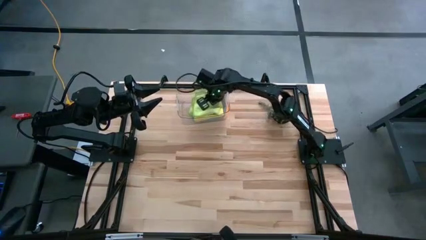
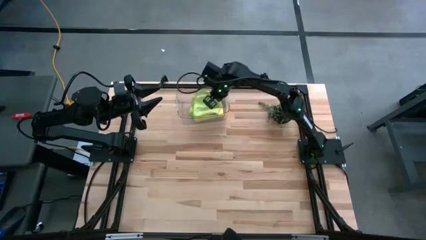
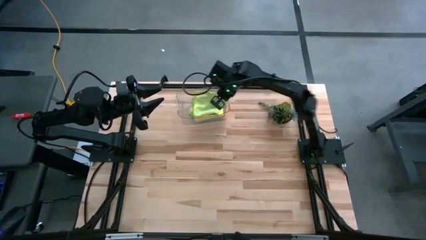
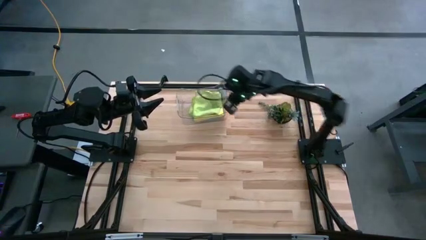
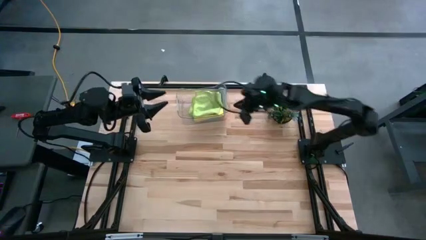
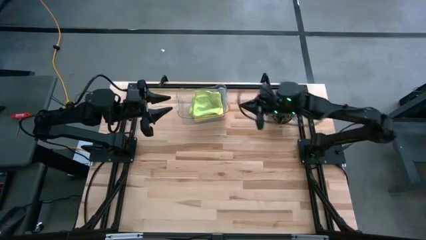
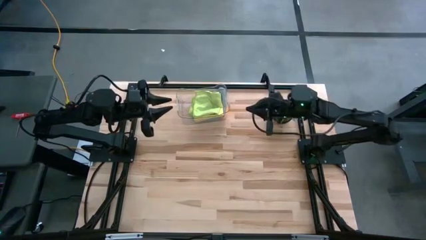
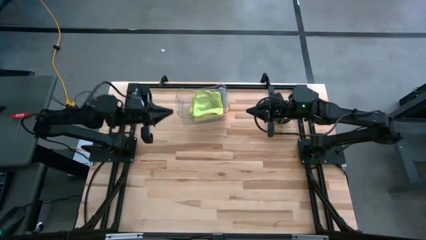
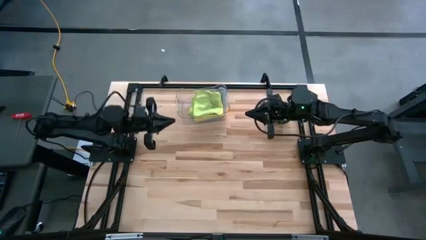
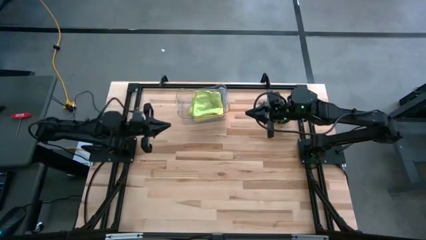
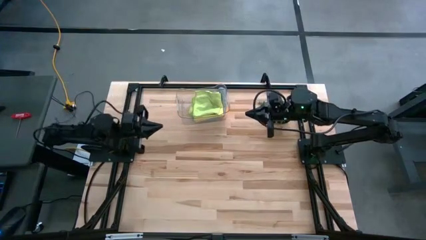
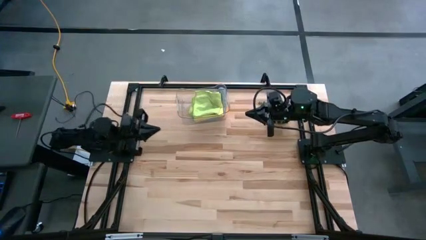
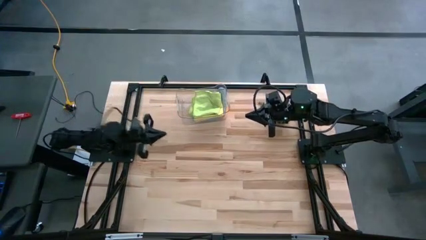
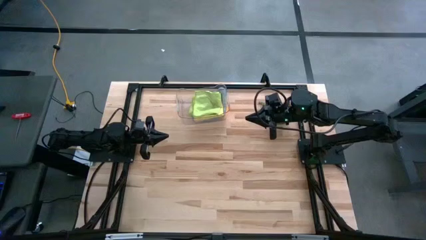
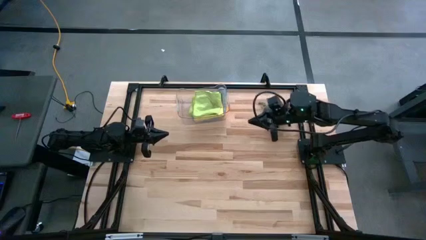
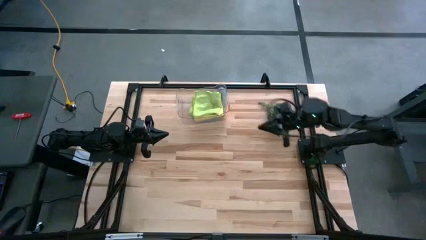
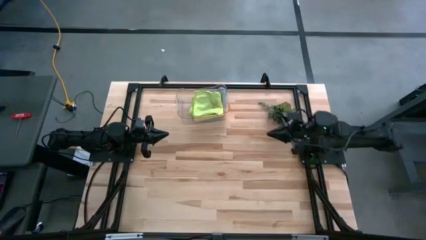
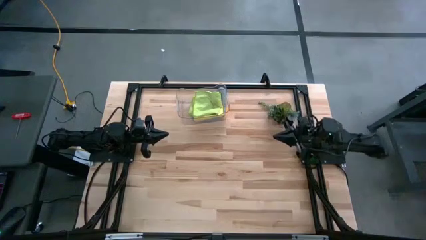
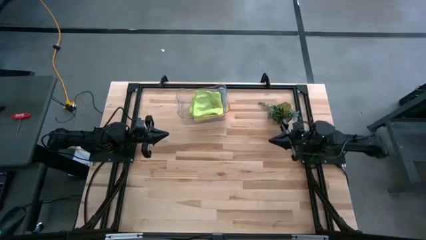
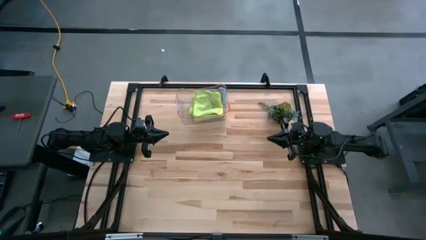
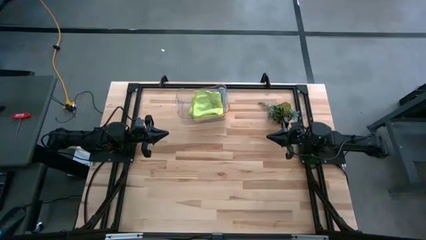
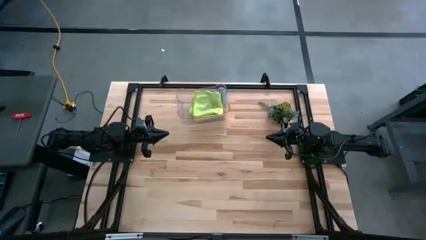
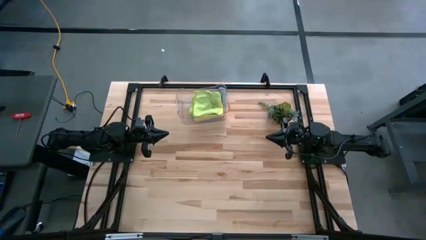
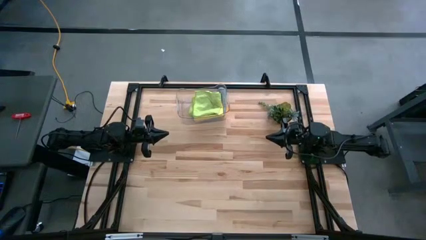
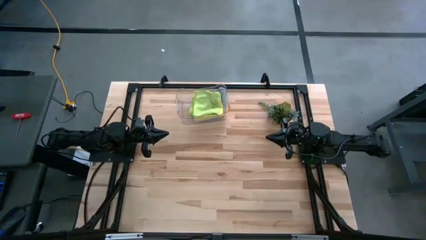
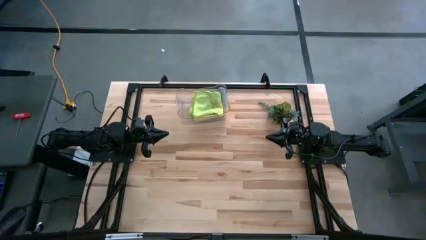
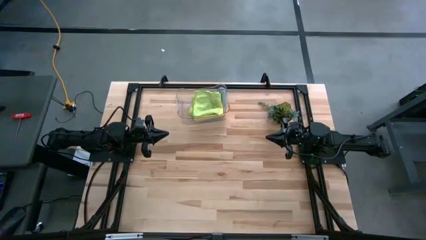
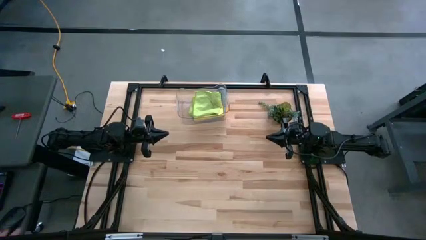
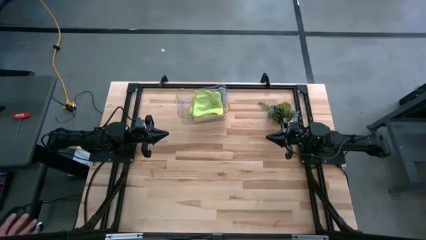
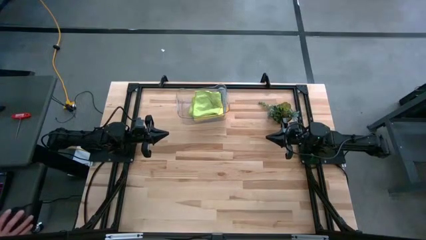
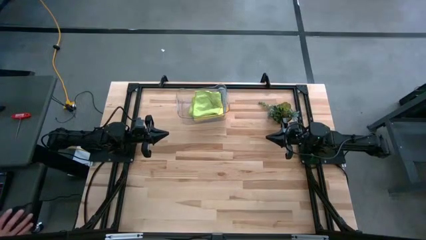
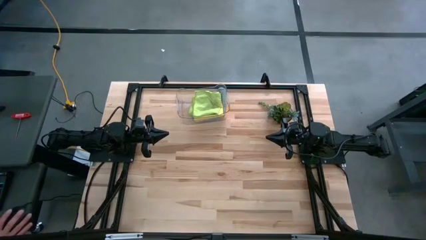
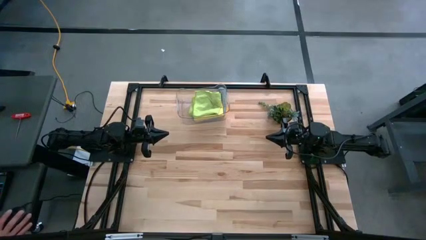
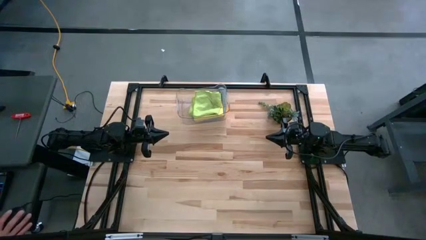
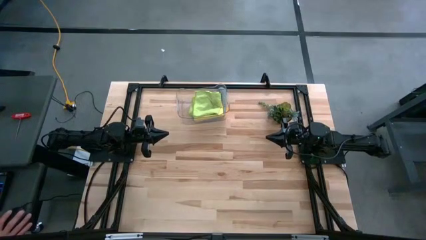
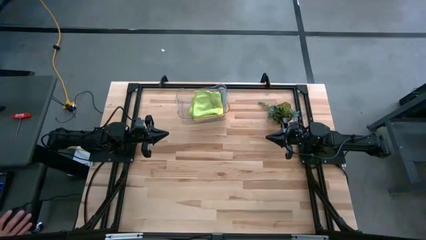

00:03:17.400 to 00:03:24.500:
Task: Fold microfiber towels
Return to Home Position

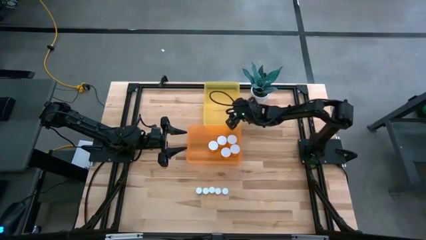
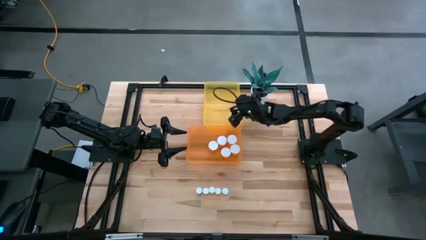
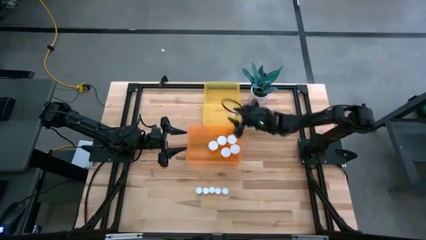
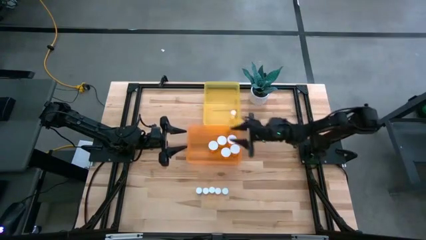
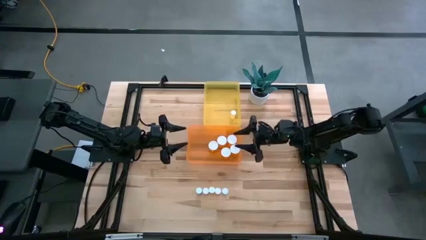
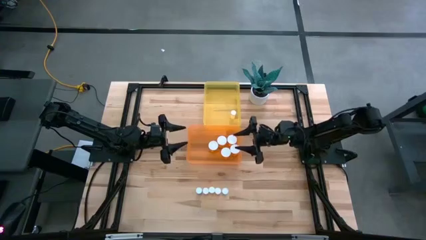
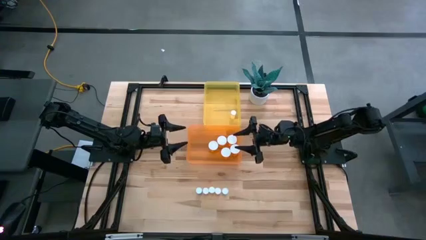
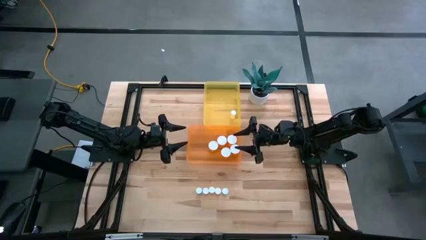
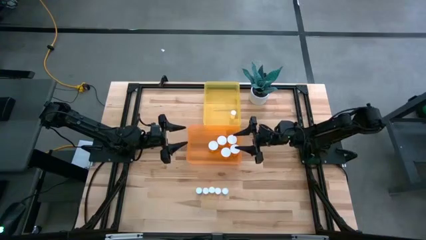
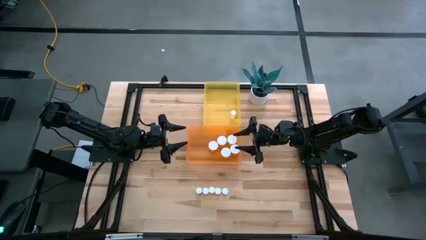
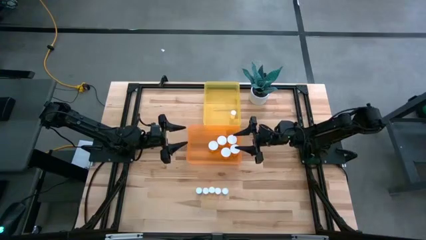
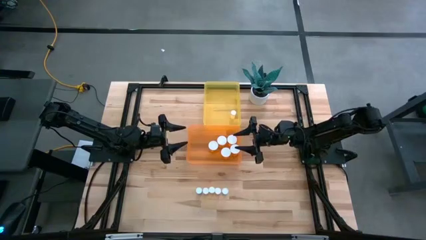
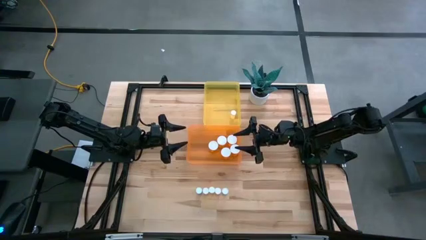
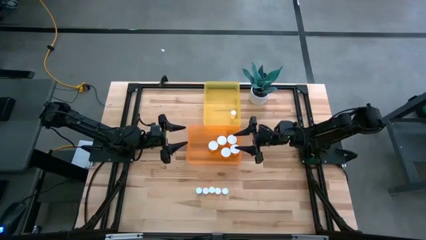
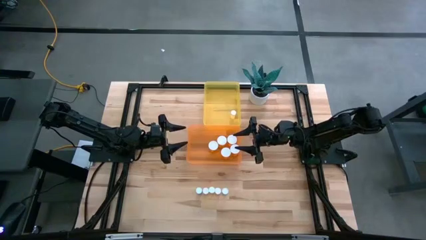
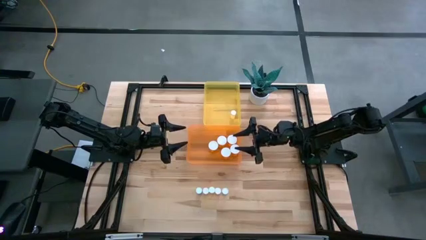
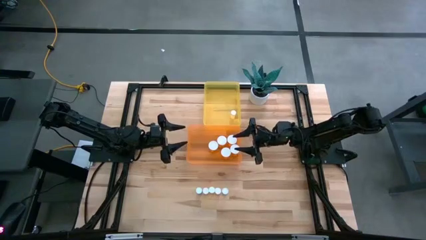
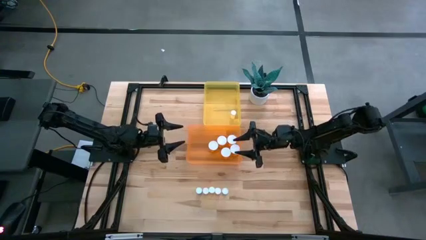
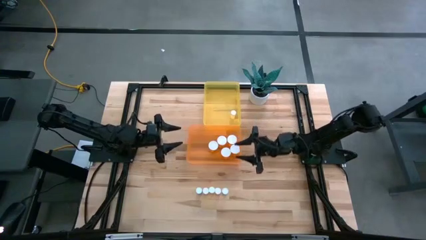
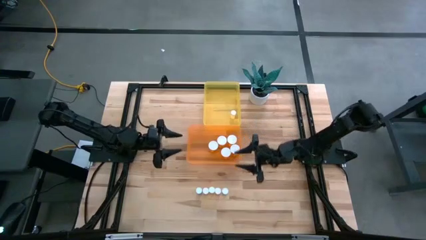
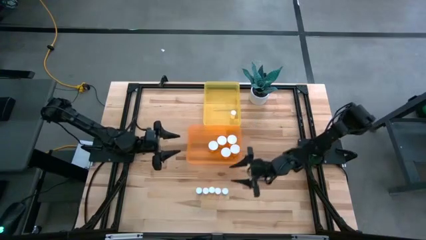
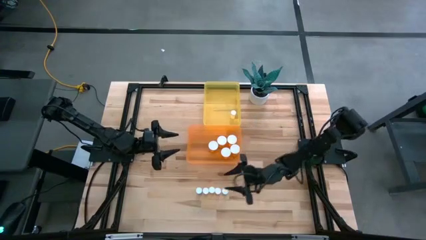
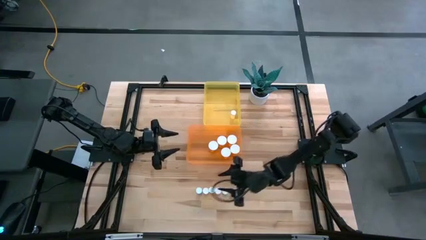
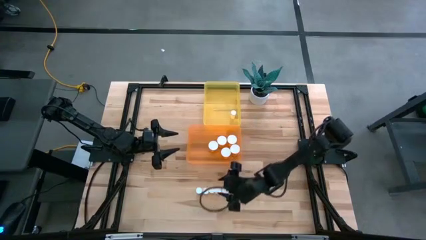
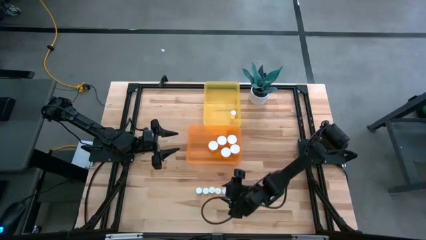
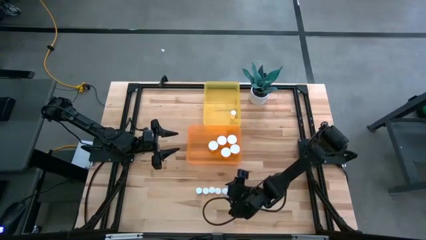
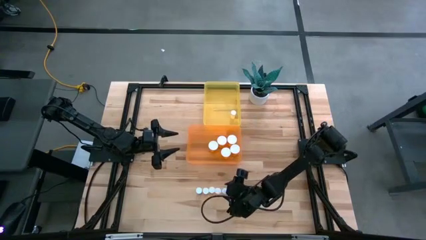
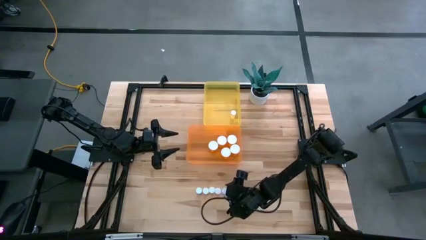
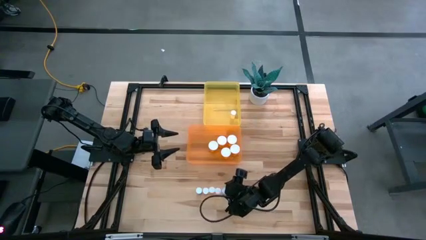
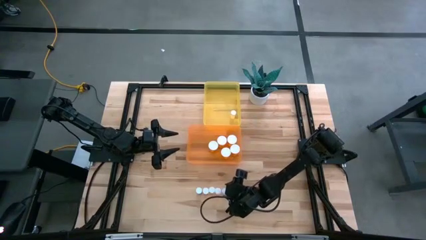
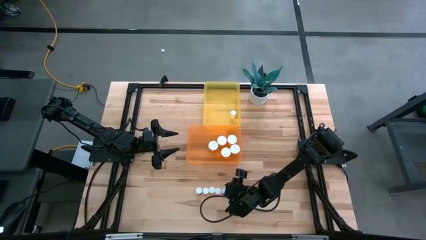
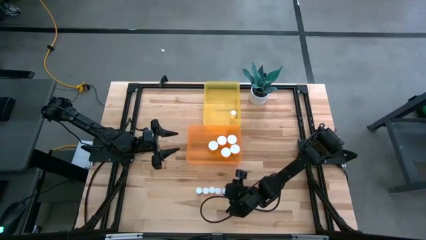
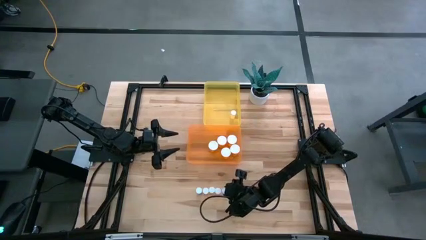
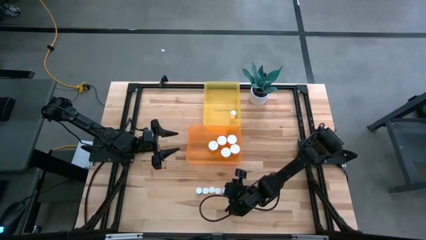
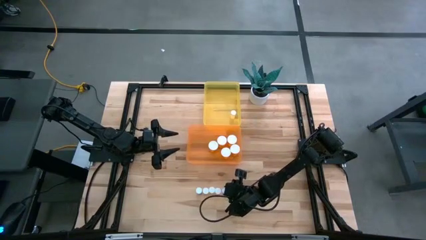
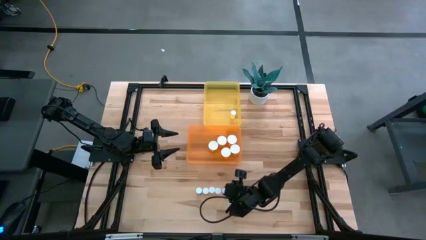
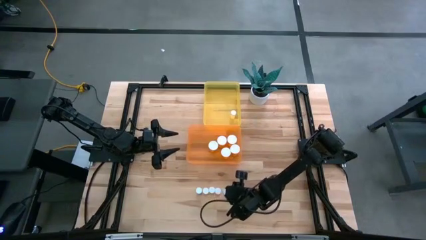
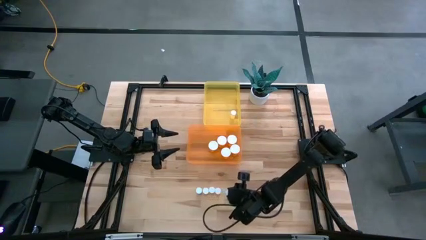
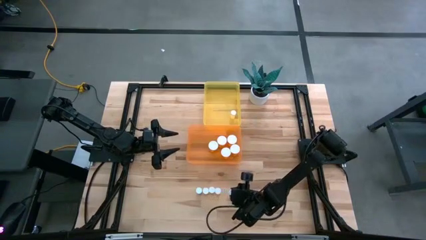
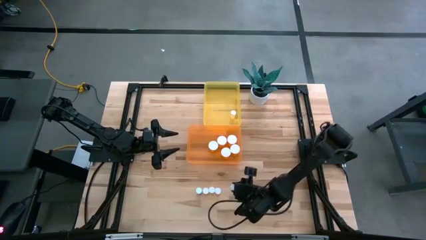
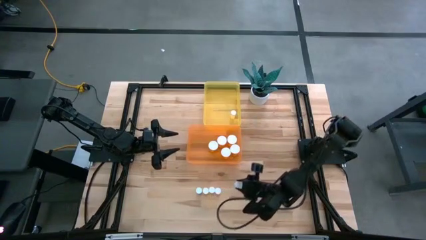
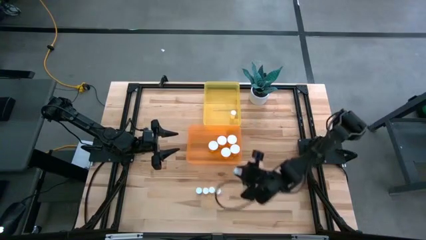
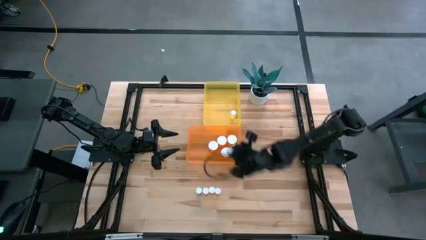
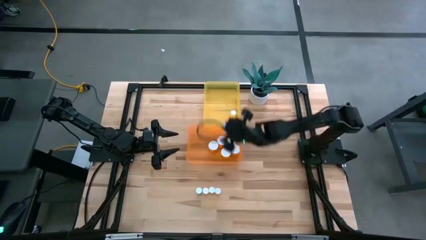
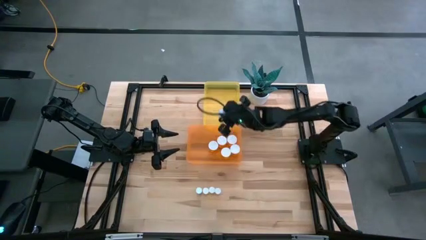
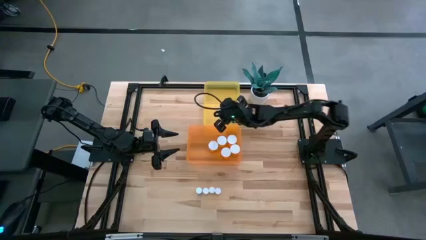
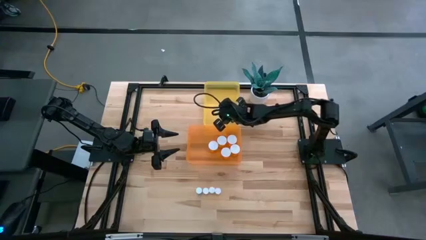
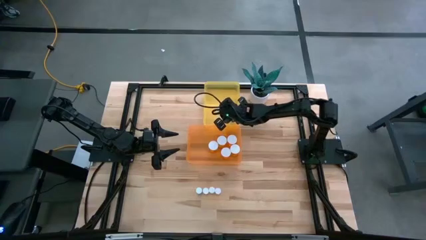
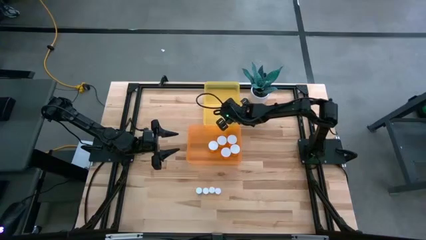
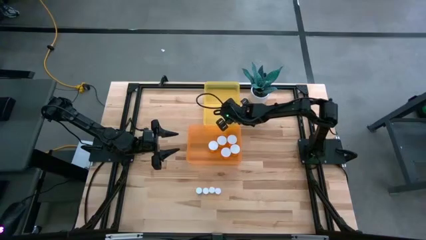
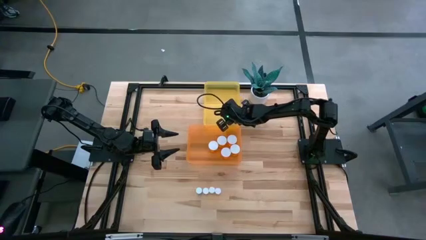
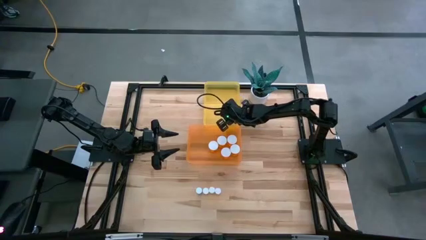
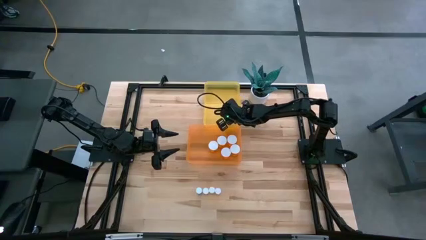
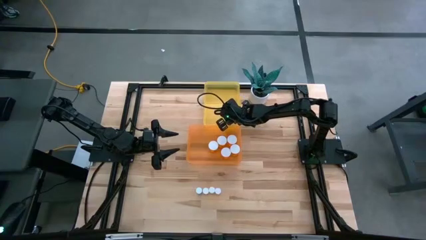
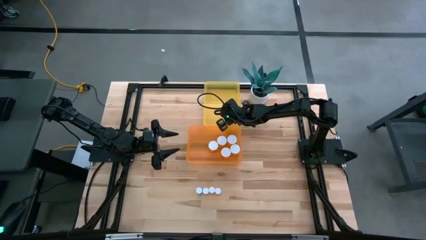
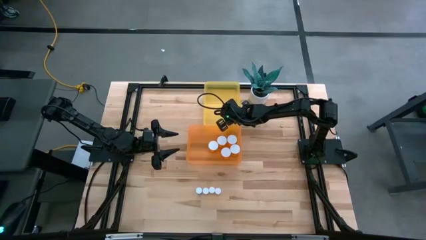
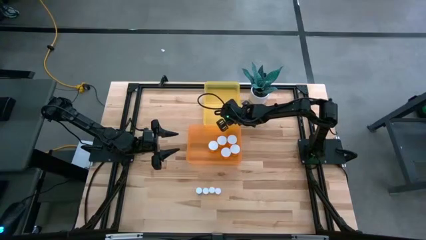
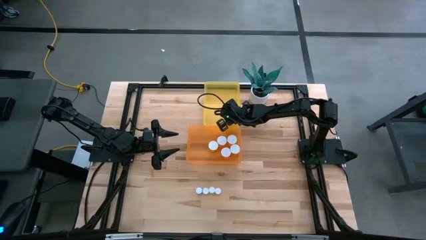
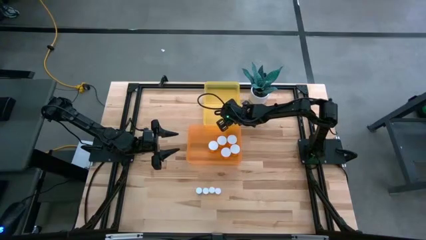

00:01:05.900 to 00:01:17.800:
Task: Pick and place medicine bottles into bin by pill shape (circle, oval)
Put the small blue pill bottle into the yellow bin
